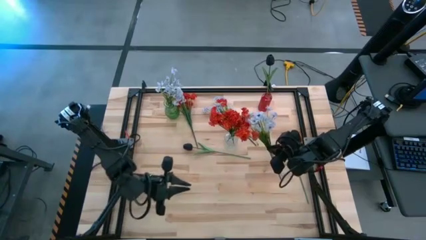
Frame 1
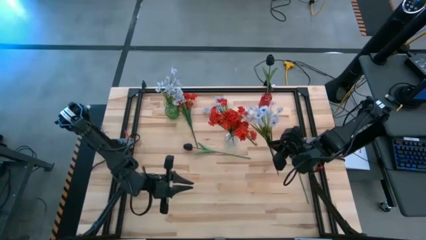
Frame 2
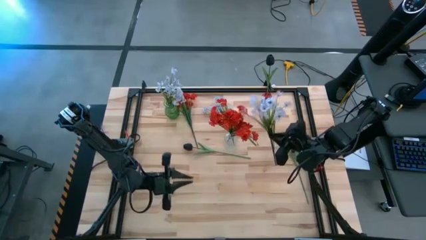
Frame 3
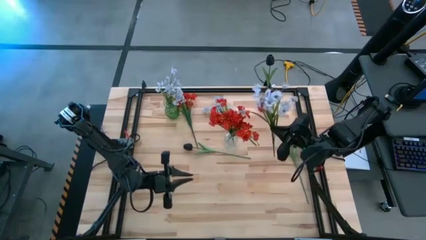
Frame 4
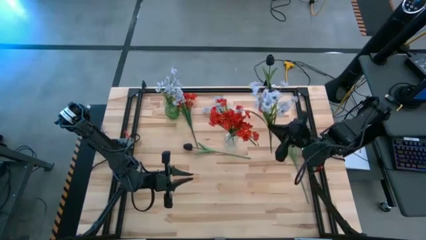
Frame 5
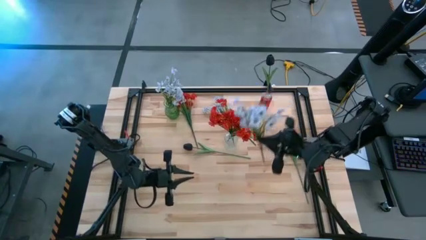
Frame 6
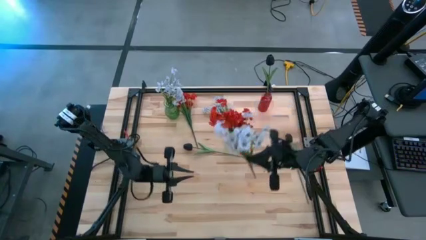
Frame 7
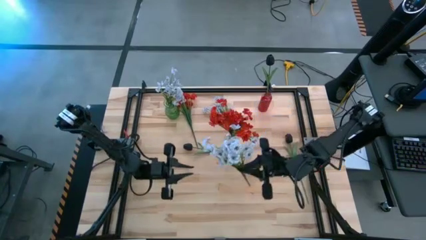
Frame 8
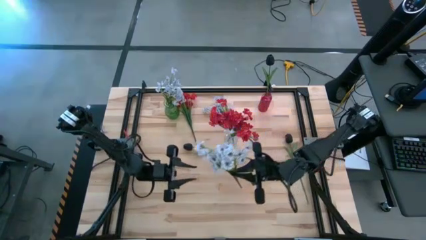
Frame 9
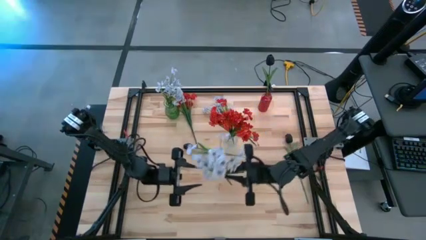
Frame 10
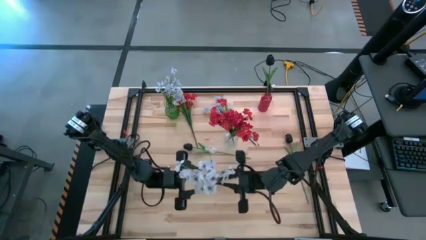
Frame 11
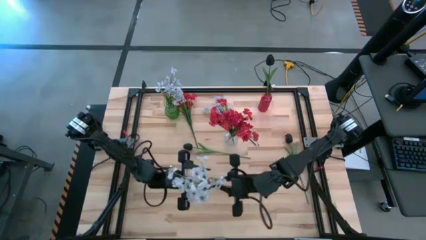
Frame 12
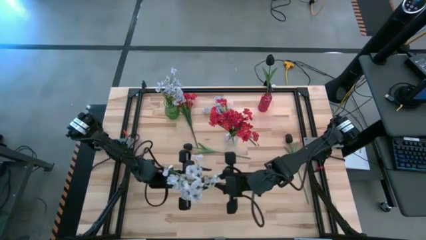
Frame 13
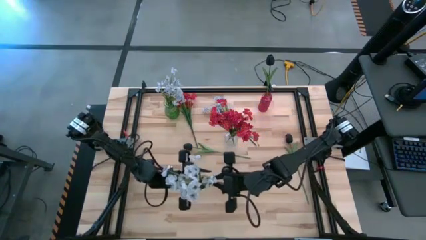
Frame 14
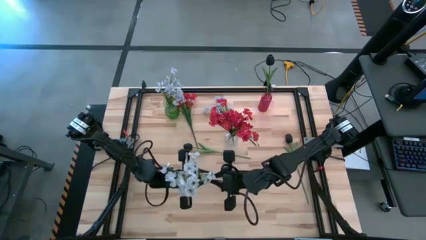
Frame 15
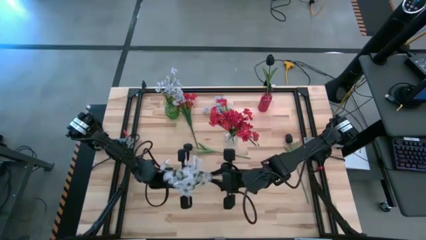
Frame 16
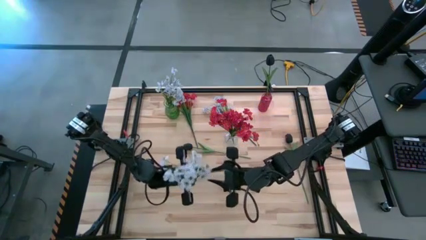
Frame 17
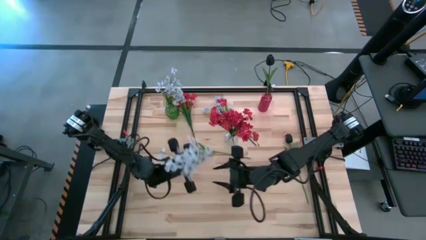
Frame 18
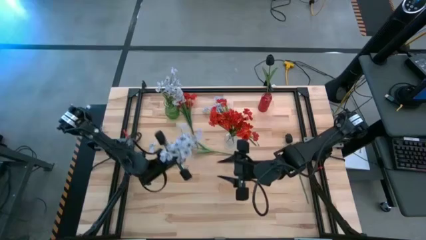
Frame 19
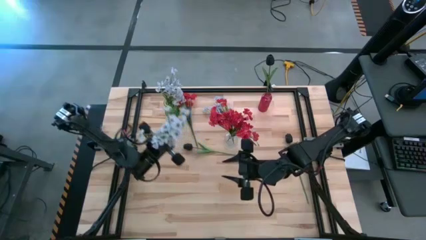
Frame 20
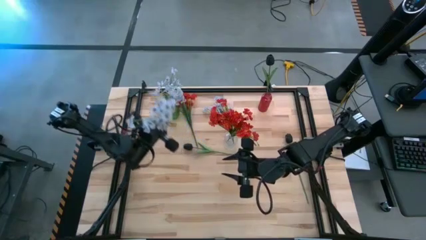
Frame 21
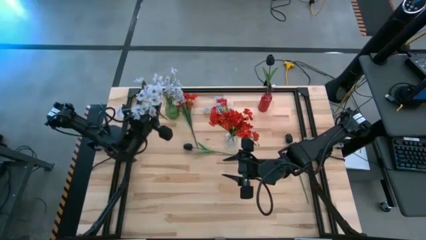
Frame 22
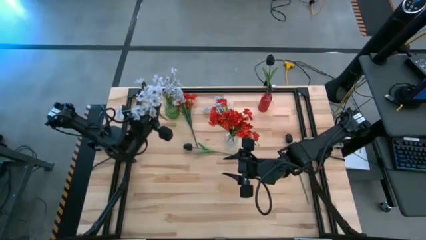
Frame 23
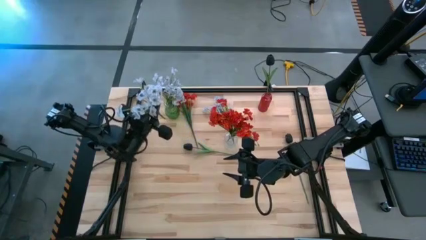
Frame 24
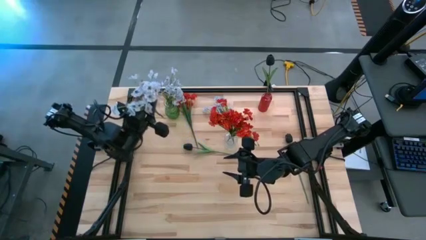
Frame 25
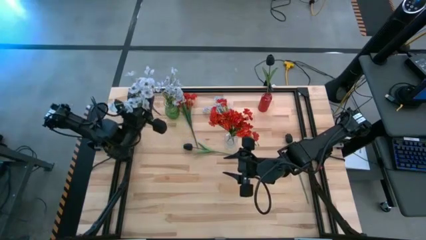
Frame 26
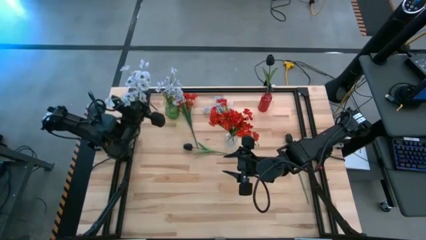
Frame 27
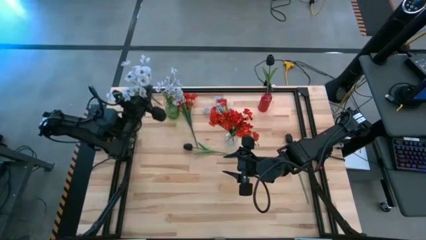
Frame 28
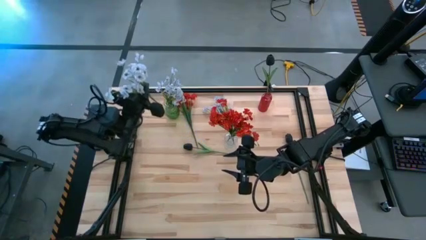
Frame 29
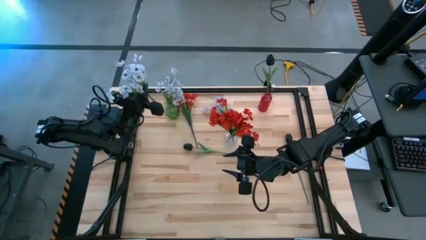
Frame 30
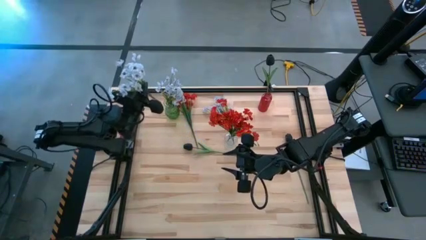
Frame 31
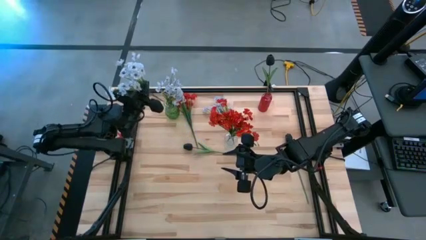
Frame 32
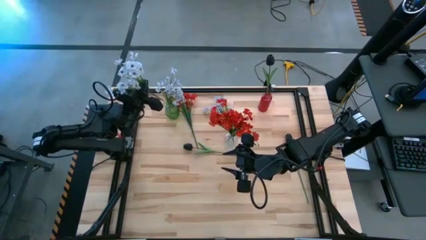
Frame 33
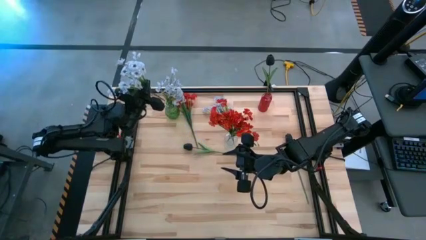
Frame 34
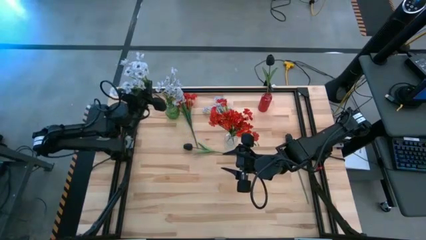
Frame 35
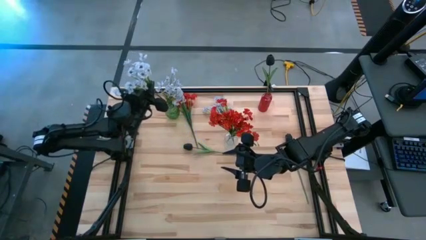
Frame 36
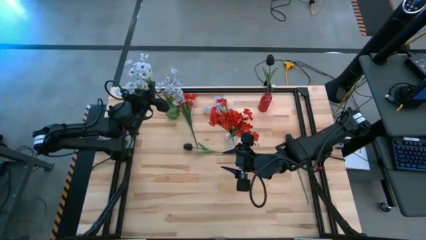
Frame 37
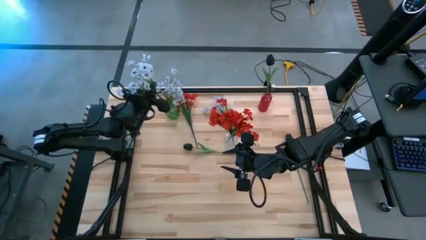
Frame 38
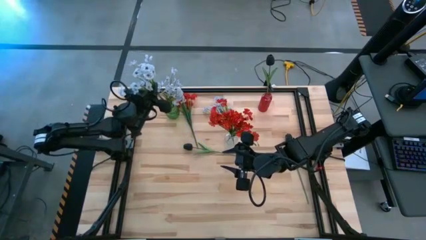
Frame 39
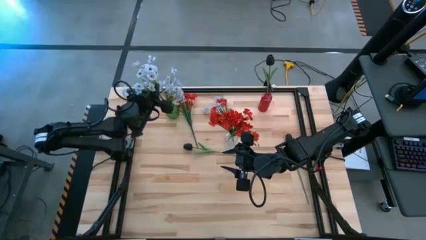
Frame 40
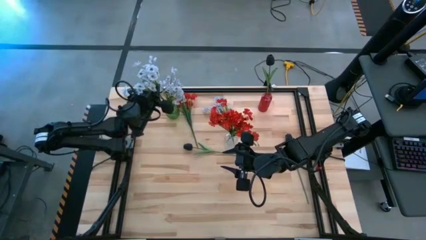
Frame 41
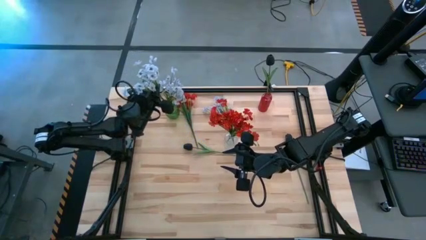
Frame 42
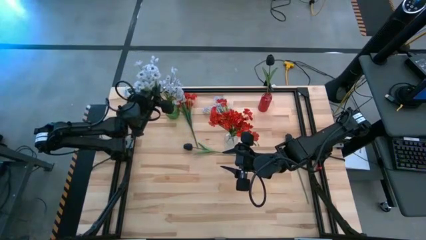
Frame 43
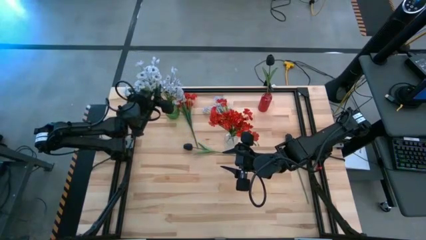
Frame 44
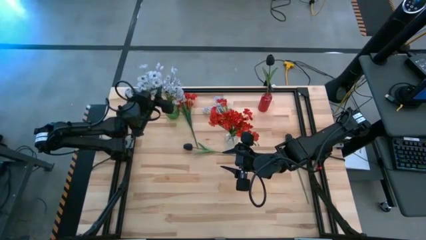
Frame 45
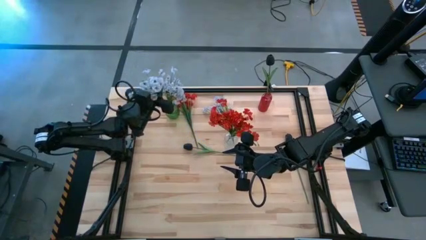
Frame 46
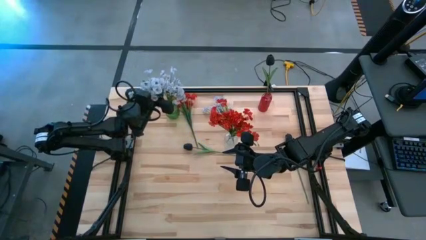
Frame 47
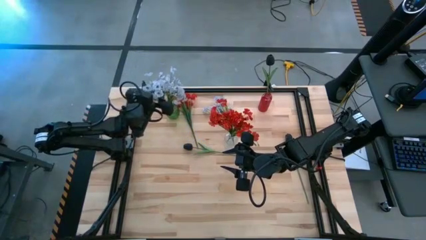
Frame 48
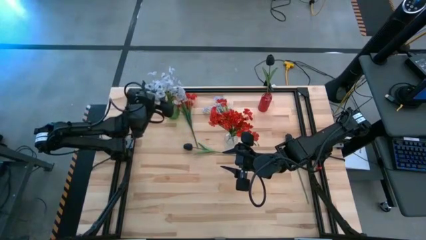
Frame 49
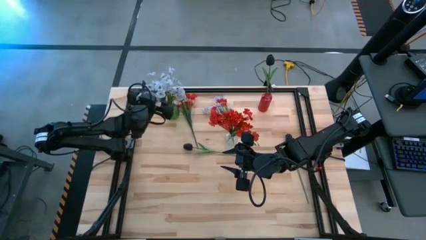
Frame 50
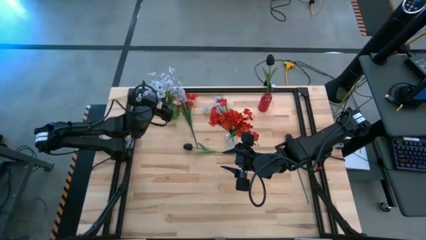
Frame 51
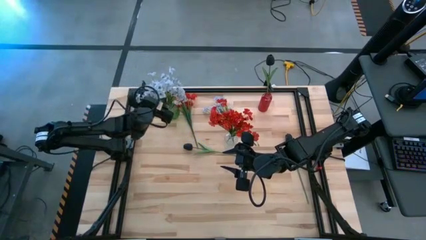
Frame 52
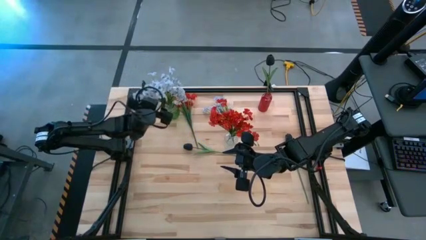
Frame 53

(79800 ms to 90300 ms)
Task: Sort flowers into vase by color
Put the bottom white flower into the green vase
